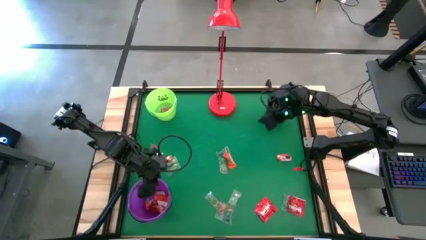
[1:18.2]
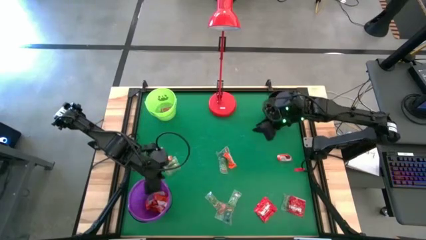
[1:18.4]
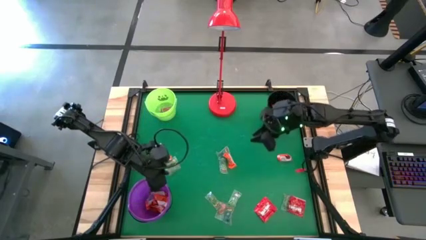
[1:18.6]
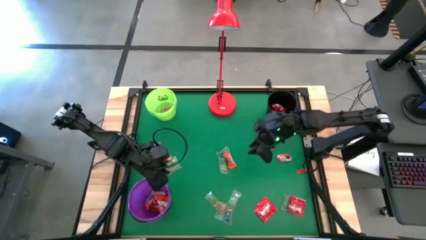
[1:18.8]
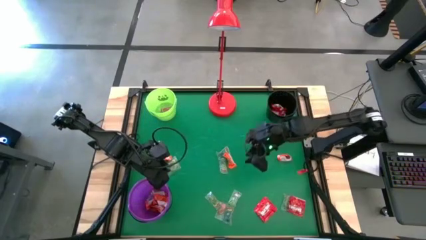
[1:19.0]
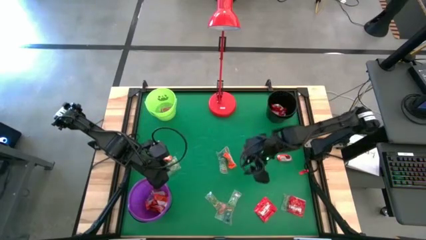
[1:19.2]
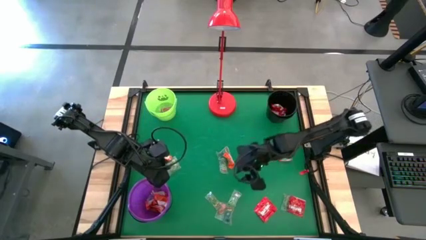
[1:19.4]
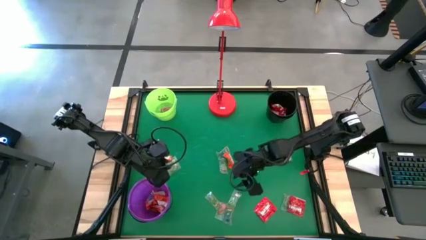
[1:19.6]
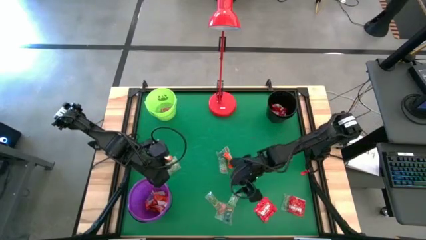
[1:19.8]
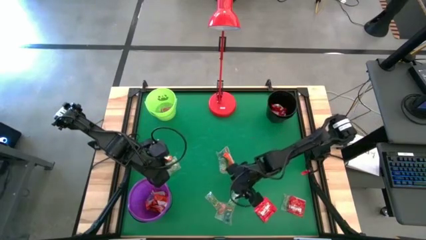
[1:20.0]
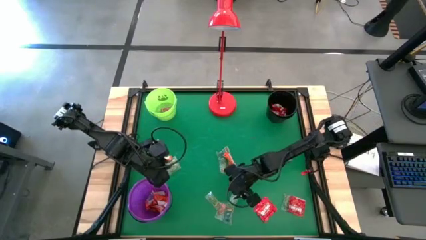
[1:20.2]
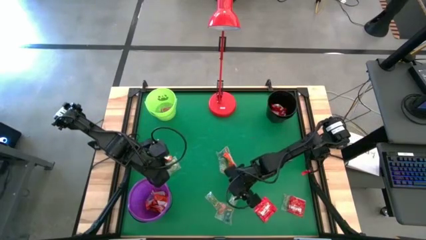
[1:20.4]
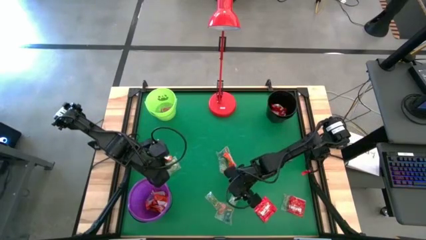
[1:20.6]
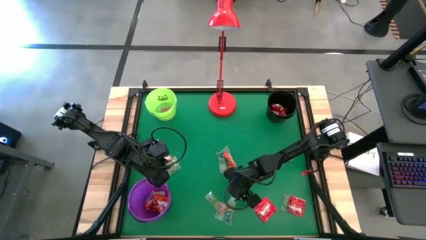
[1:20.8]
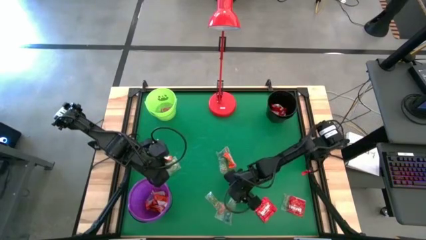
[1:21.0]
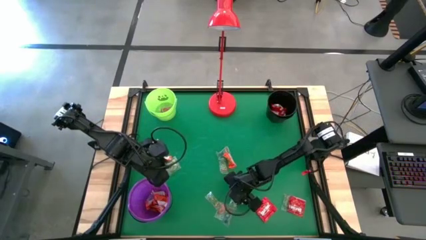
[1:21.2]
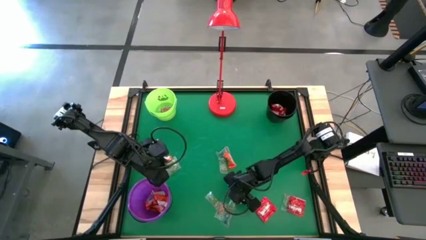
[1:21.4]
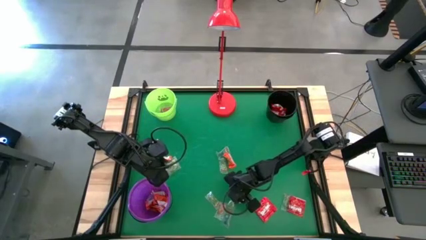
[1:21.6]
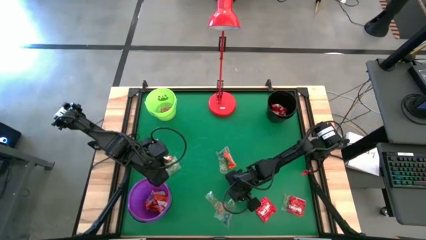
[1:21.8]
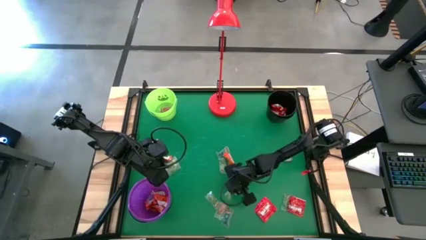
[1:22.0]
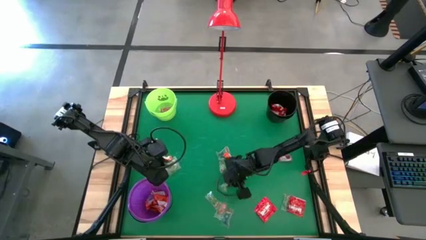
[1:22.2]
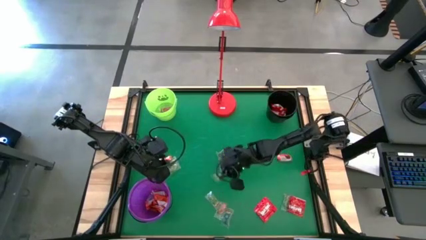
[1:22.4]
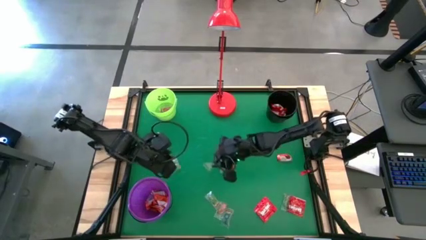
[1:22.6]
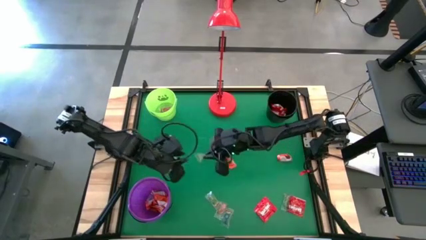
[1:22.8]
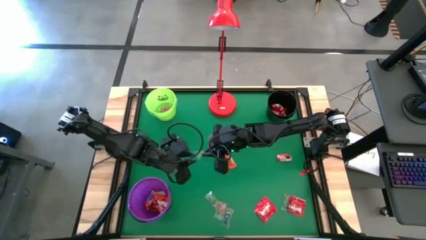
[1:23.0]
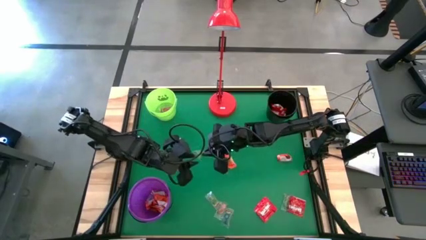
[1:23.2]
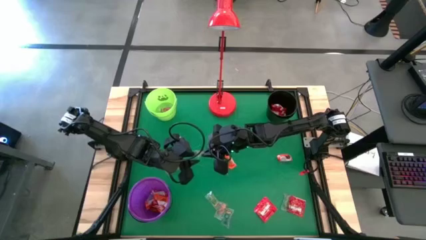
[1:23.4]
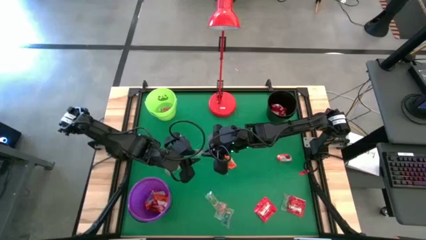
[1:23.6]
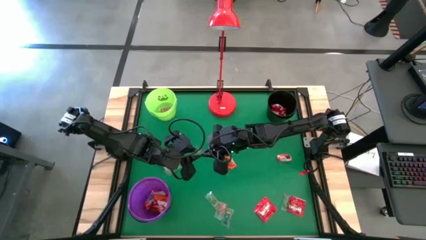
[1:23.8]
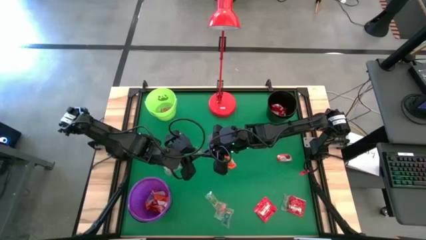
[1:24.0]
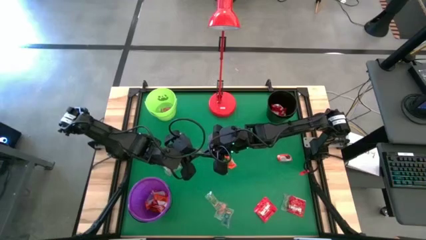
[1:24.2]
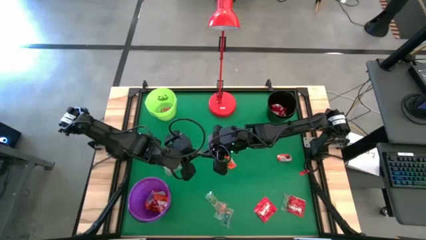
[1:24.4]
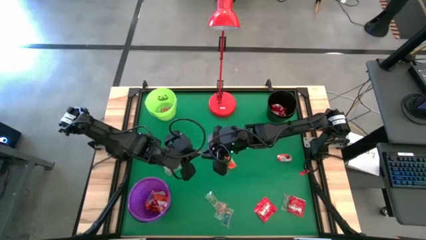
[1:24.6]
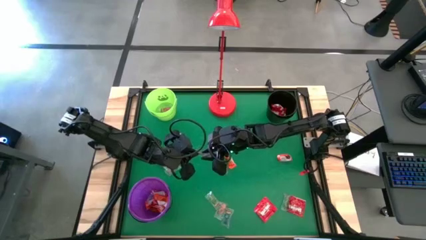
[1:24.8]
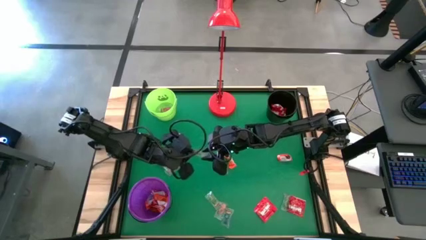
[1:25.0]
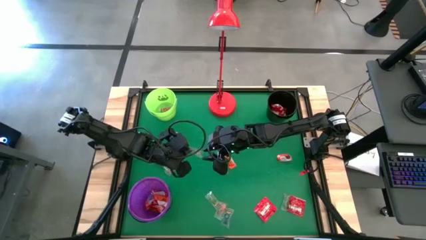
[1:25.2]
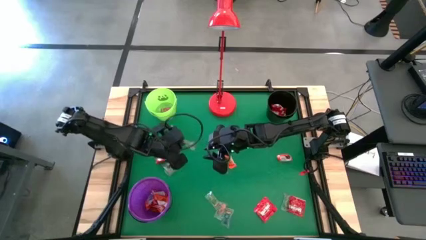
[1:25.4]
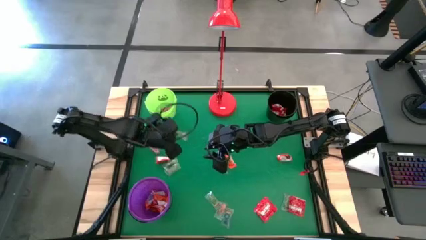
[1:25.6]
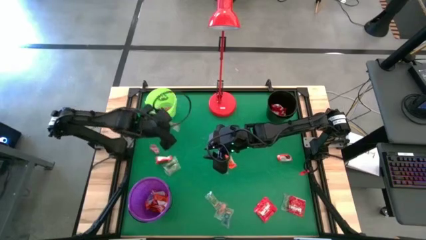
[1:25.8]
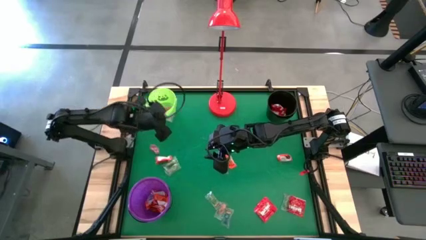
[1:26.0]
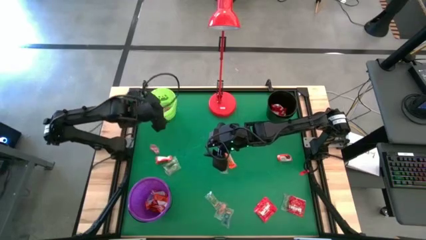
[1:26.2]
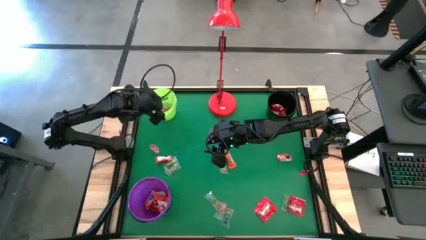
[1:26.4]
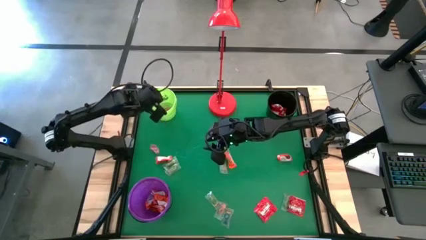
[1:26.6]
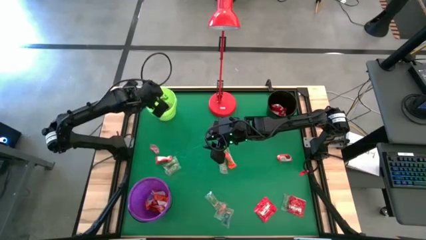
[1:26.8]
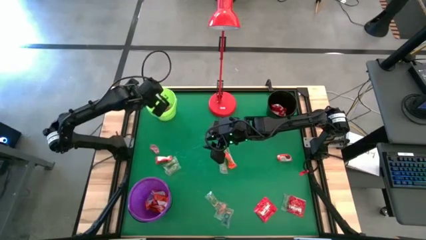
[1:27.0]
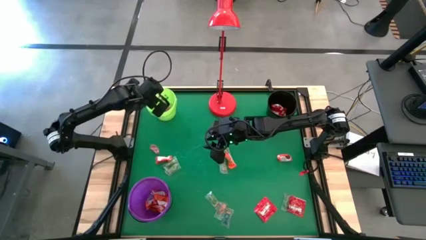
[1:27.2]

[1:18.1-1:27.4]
Task: Sort candy
Put the transparent candy into the green bucket

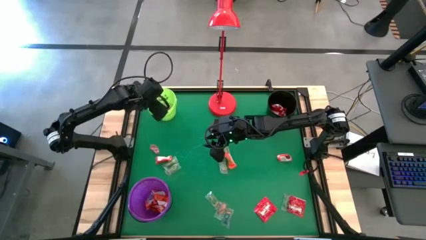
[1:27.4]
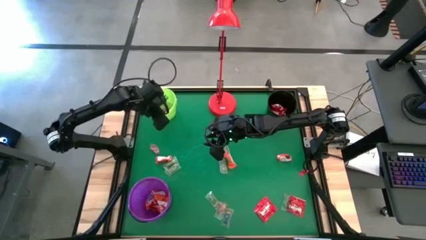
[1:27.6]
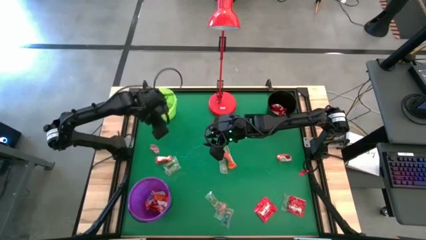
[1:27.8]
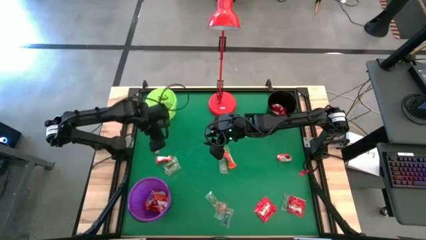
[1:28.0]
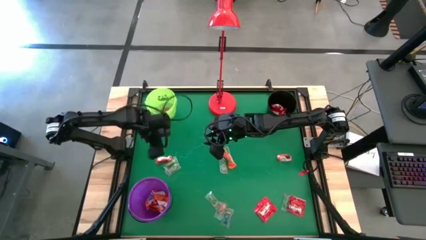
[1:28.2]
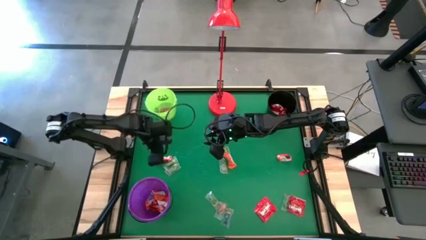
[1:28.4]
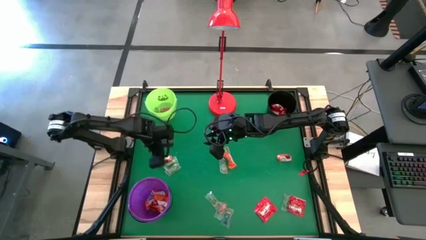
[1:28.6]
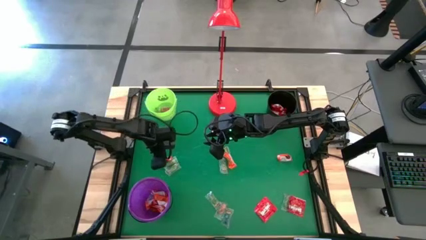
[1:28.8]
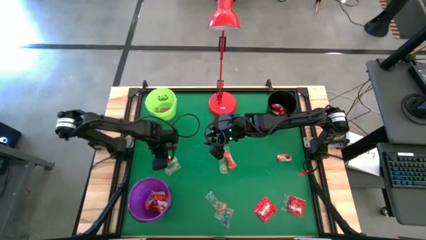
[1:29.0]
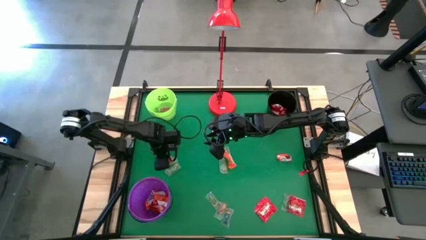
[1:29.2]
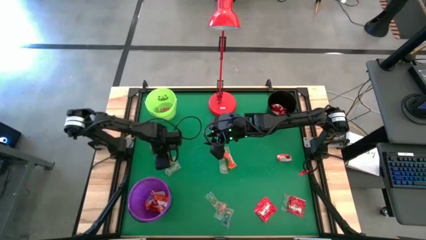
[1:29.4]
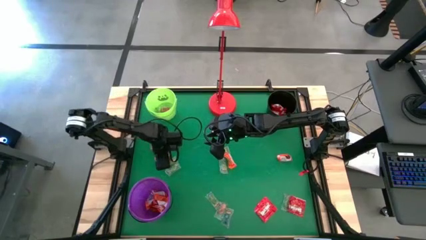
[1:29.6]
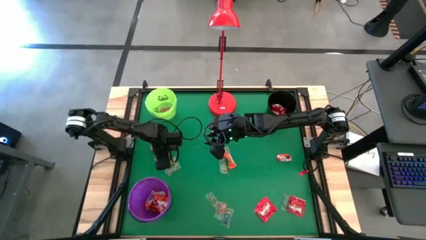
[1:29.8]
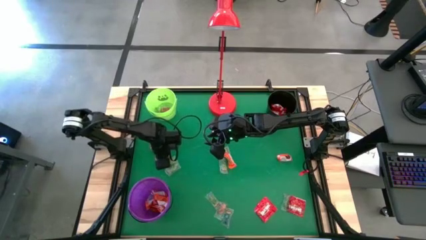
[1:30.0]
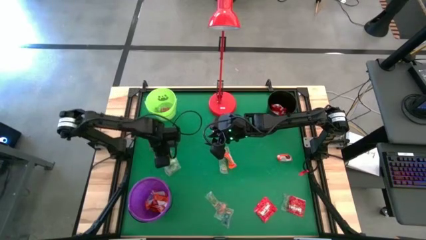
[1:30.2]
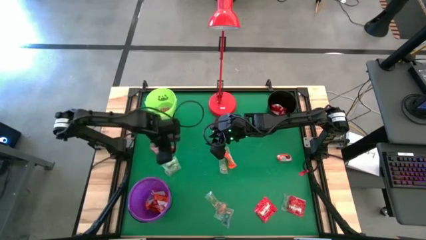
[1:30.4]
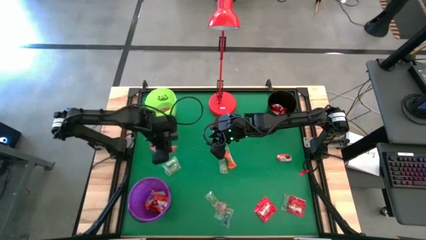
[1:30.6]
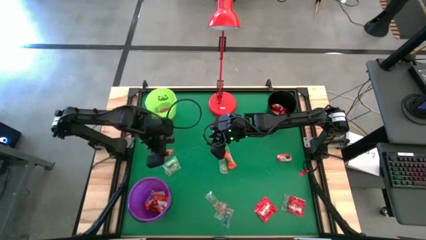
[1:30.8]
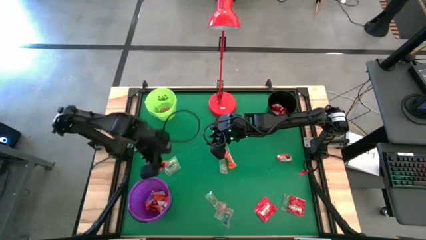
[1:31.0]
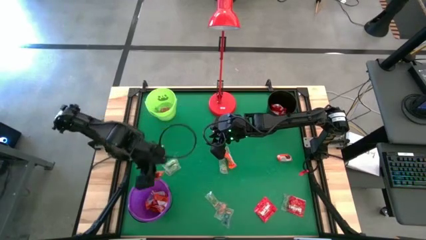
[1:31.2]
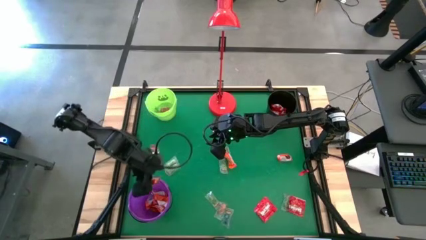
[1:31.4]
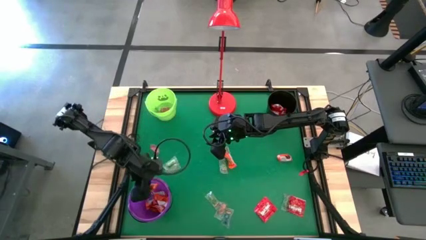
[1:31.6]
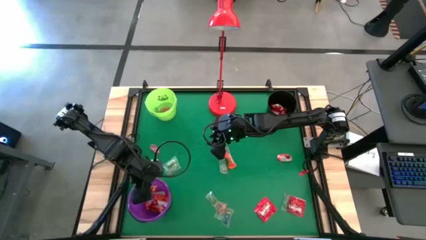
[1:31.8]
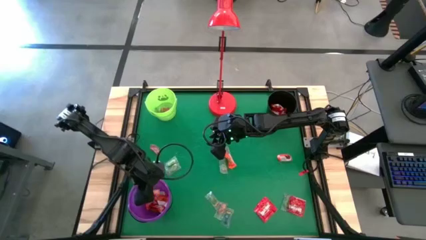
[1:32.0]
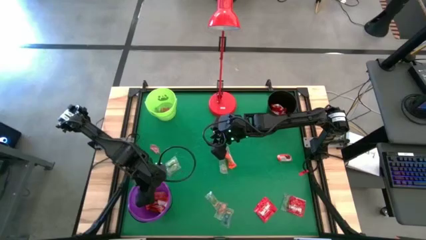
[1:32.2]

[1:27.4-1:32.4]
Put the orange candy into the violet bucket
